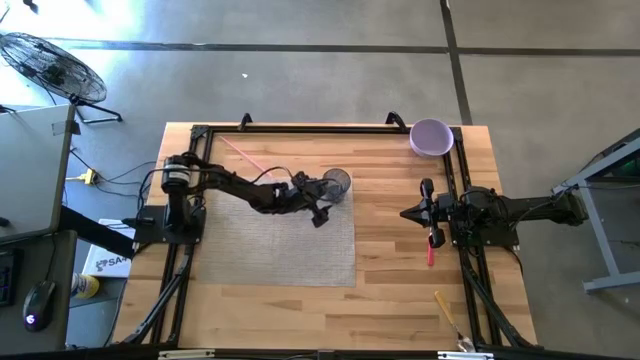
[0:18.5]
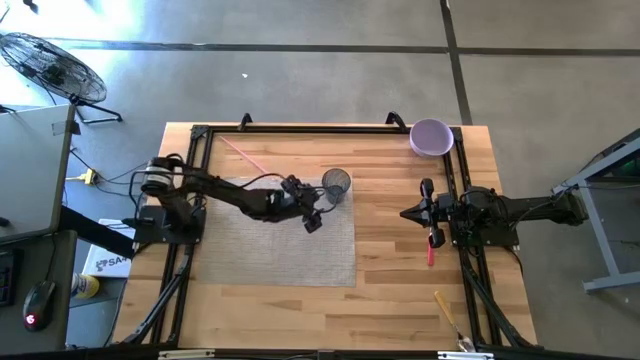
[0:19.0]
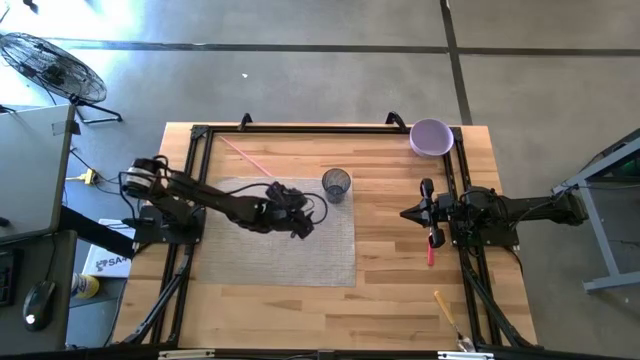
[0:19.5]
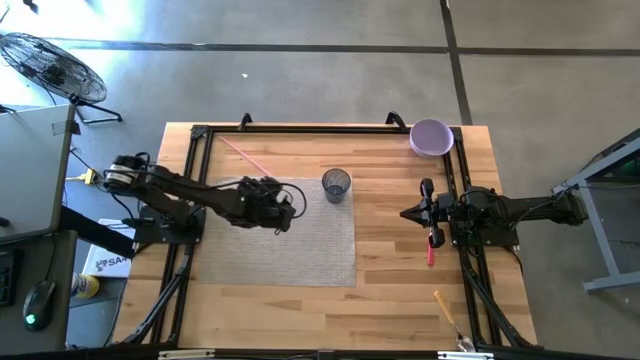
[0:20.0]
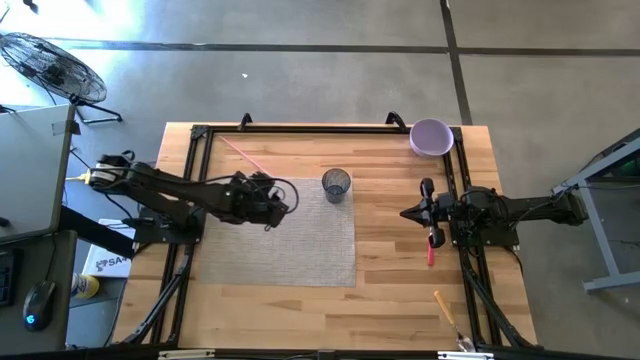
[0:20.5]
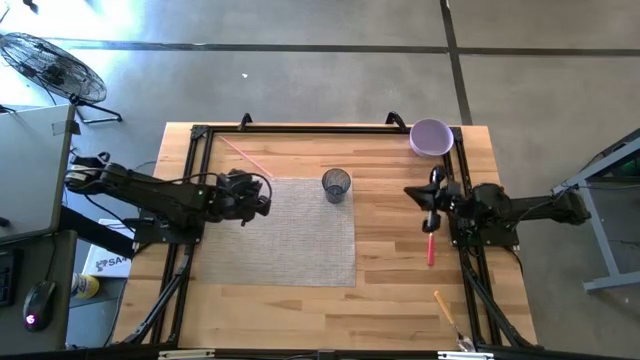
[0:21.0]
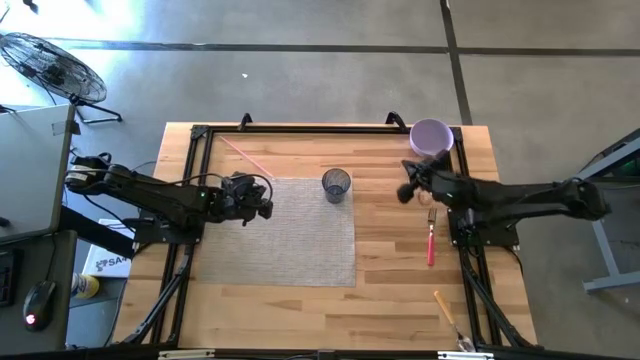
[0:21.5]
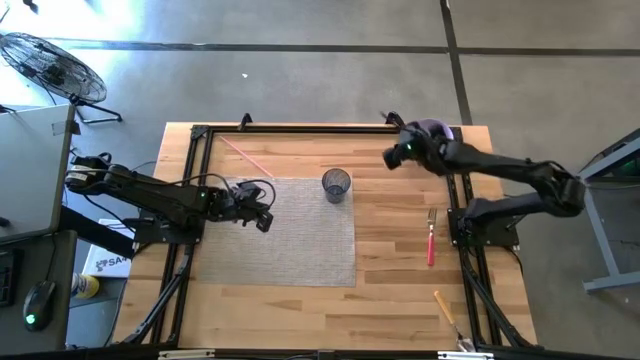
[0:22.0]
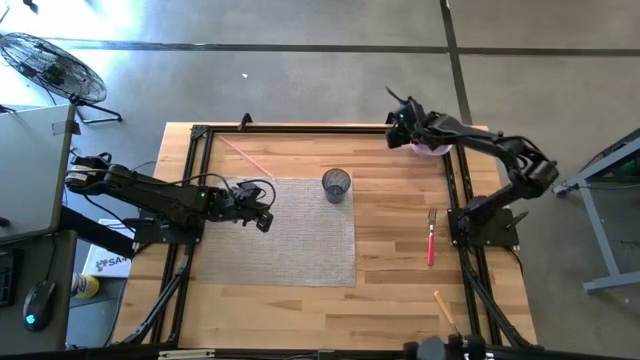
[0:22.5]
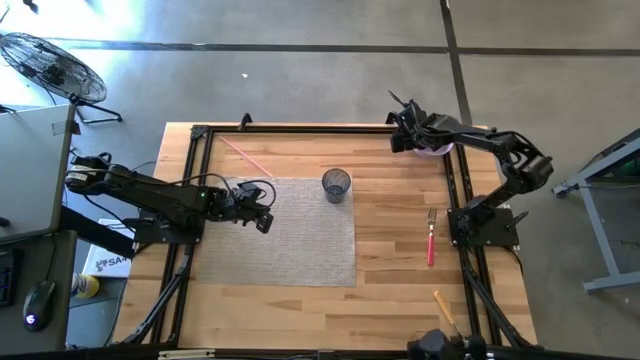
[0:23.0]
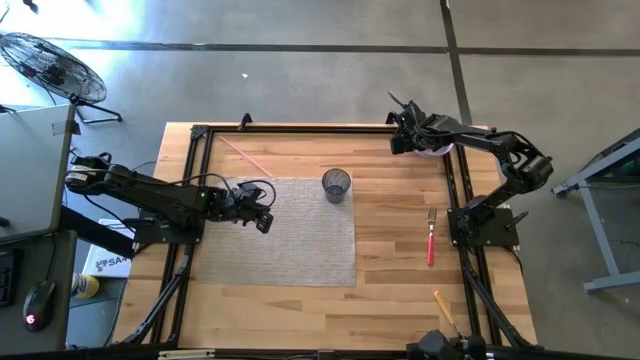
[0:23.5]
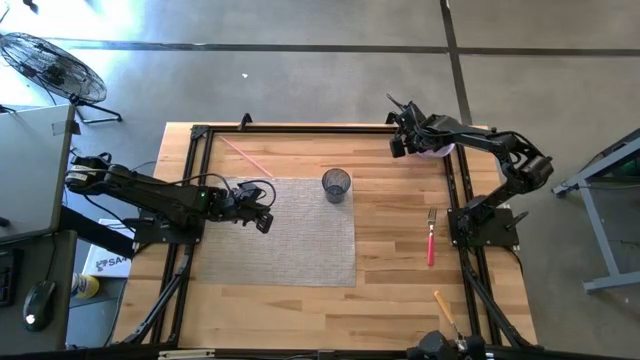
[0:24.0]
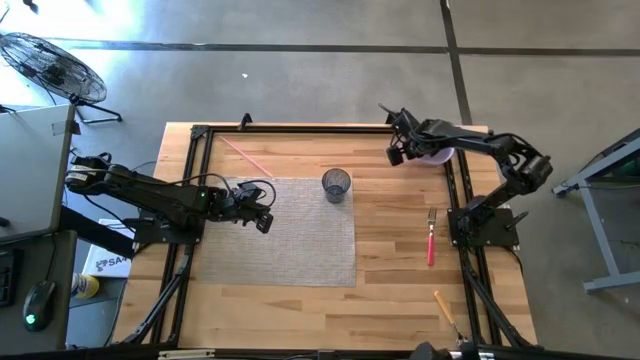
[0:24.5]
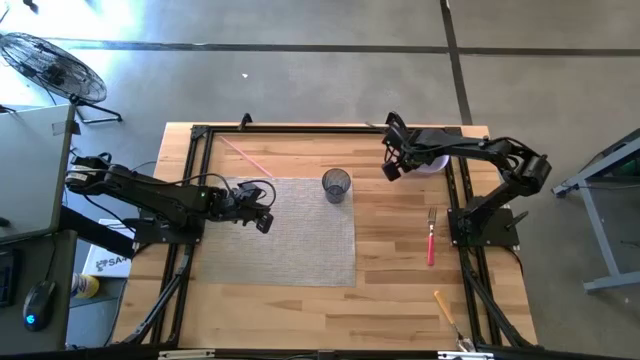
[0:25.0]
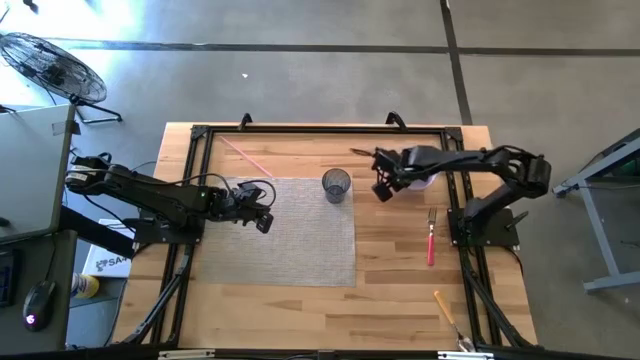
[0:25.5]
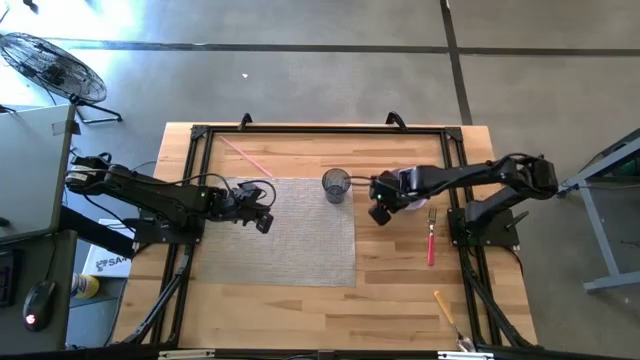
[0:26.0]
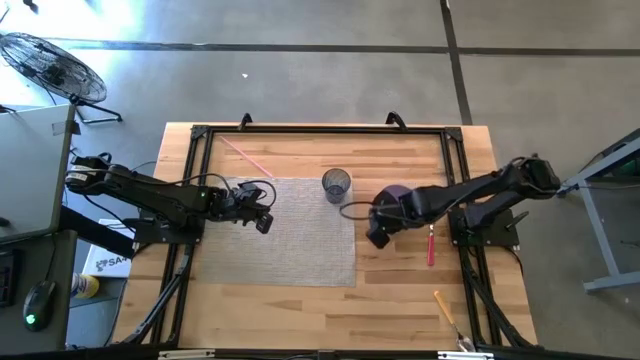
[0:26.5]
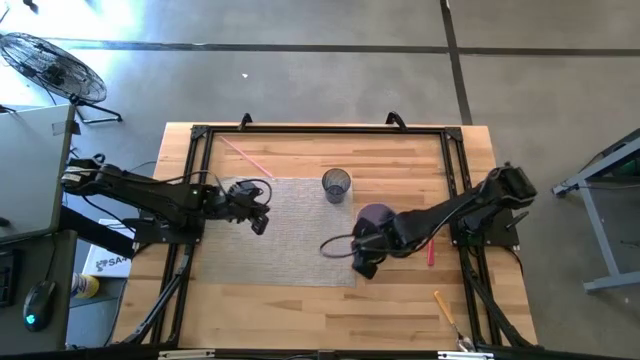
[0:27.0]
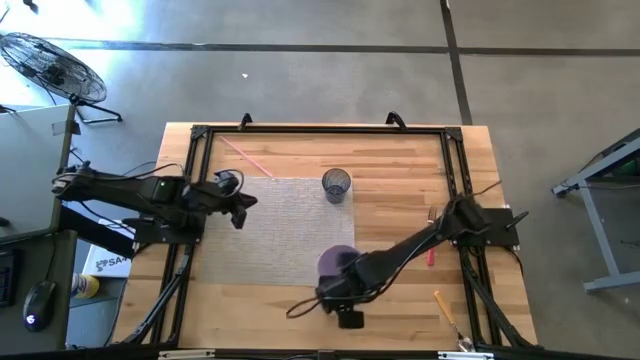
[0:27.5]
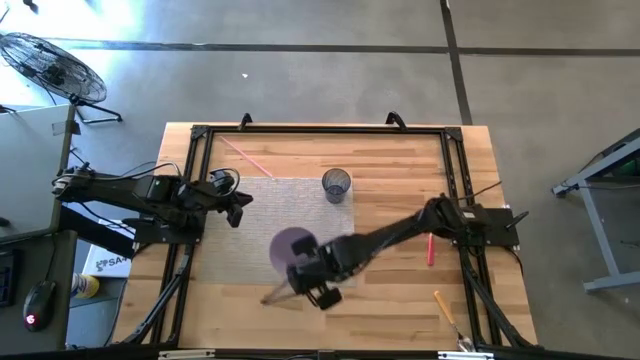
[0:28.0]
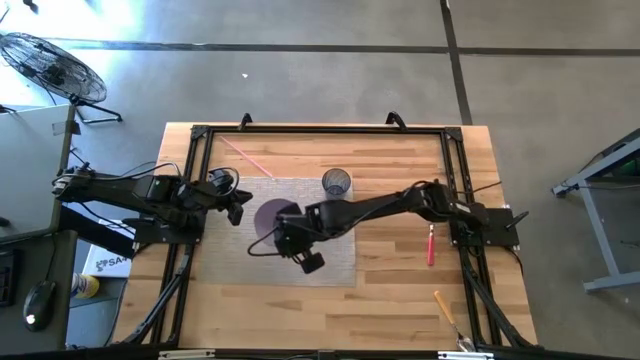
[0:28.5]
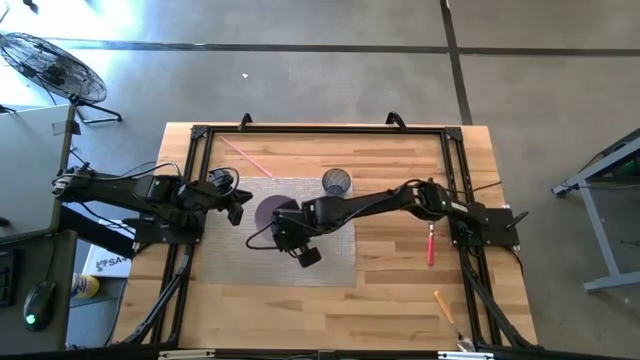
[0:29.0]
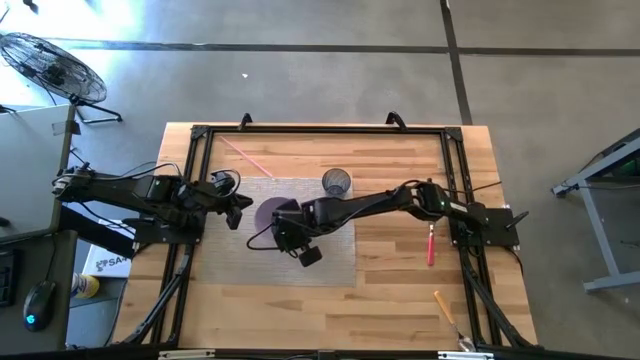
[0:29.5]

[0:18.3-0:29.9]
Task: Pick & Place Utensil
Put the purple bowl on the gray mat to the bottom left of the blue cup

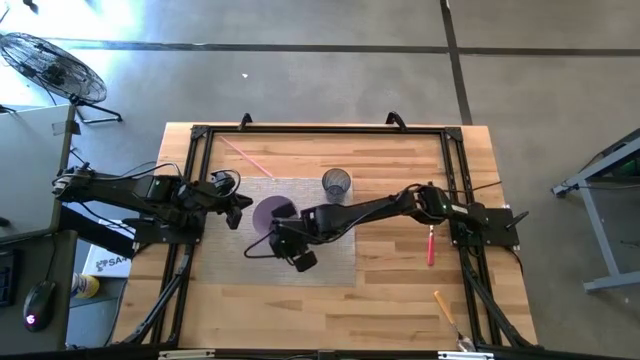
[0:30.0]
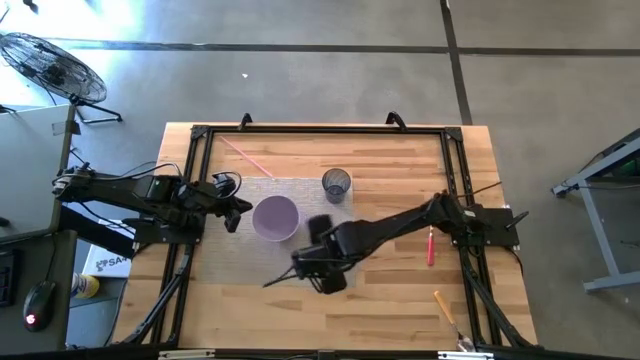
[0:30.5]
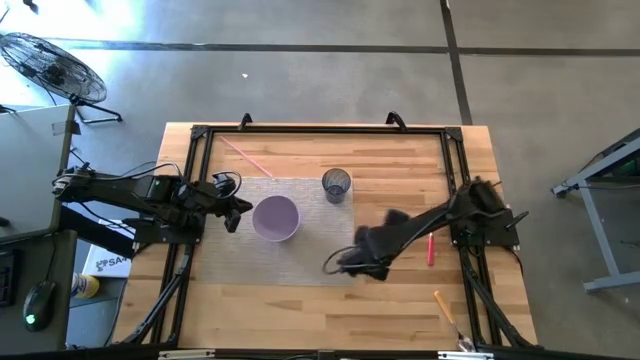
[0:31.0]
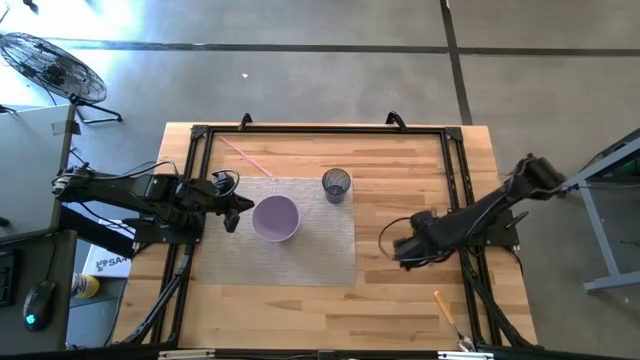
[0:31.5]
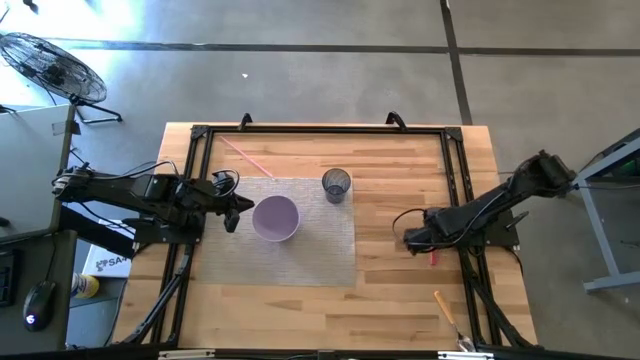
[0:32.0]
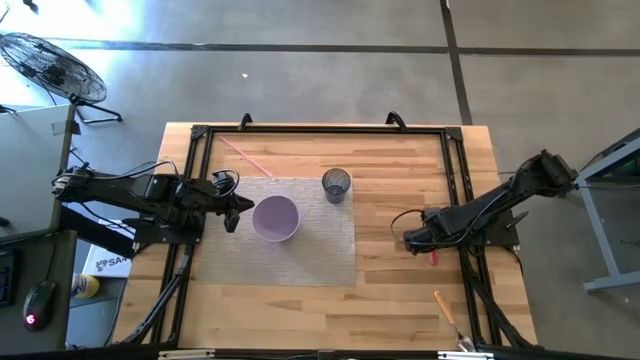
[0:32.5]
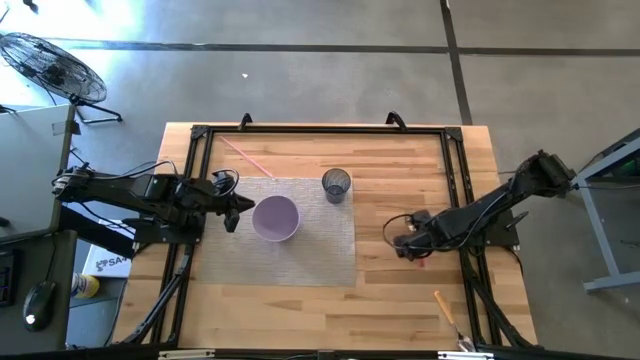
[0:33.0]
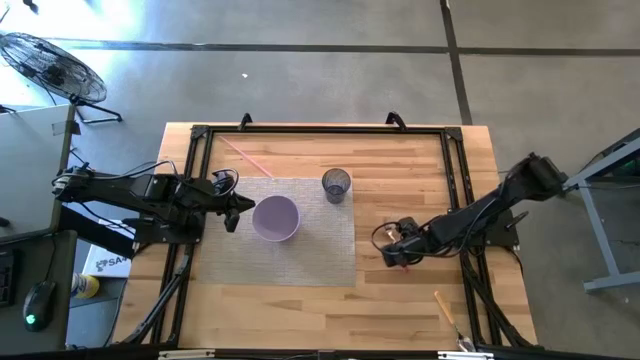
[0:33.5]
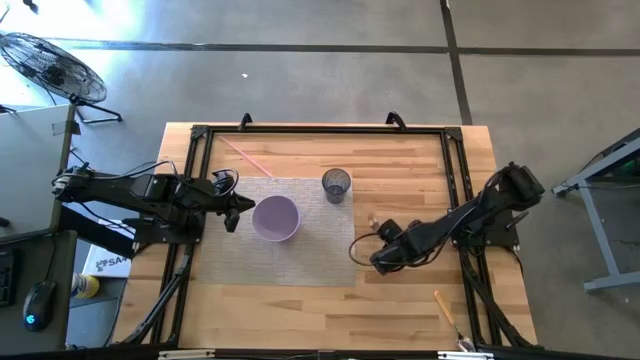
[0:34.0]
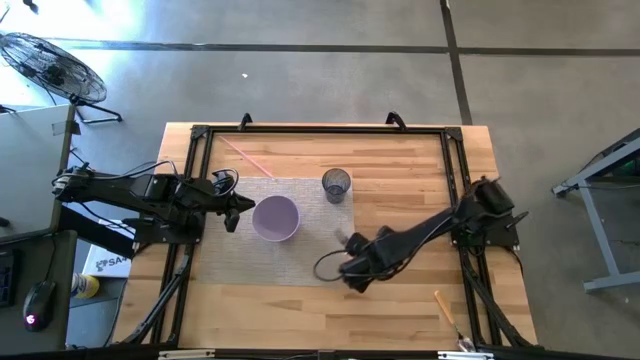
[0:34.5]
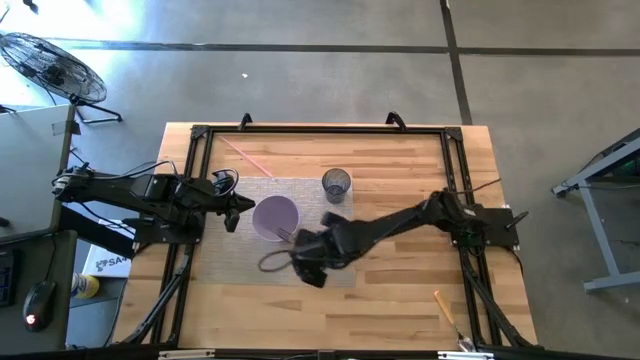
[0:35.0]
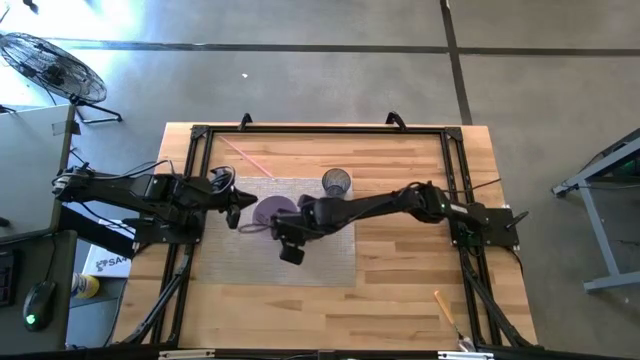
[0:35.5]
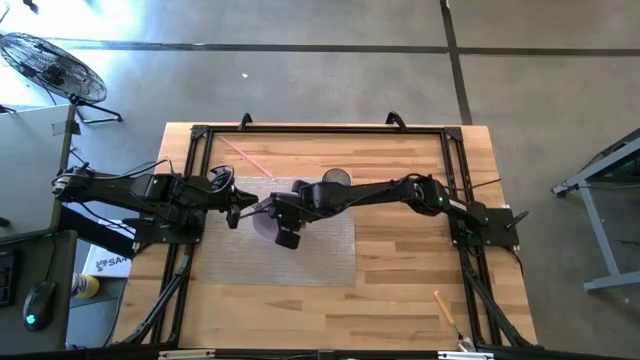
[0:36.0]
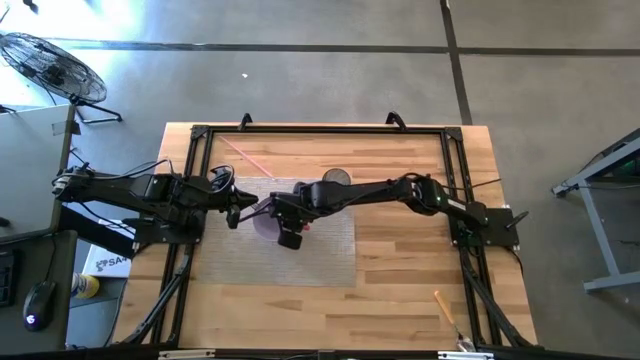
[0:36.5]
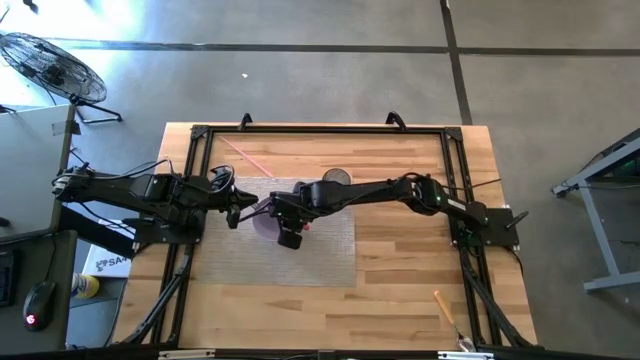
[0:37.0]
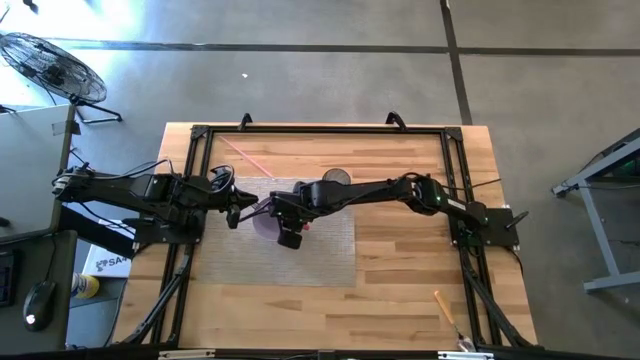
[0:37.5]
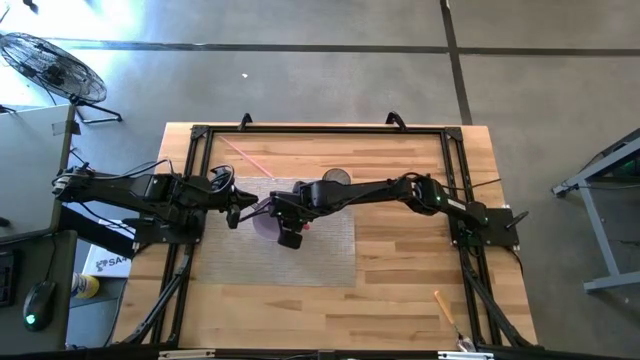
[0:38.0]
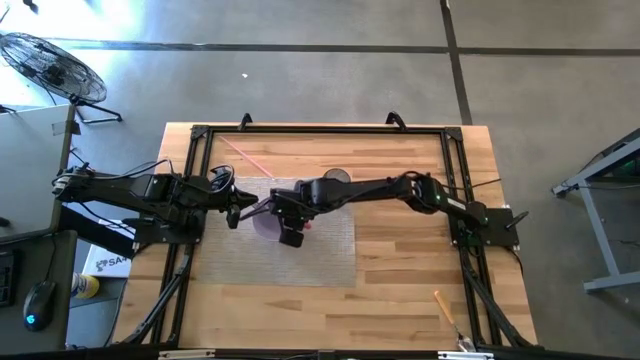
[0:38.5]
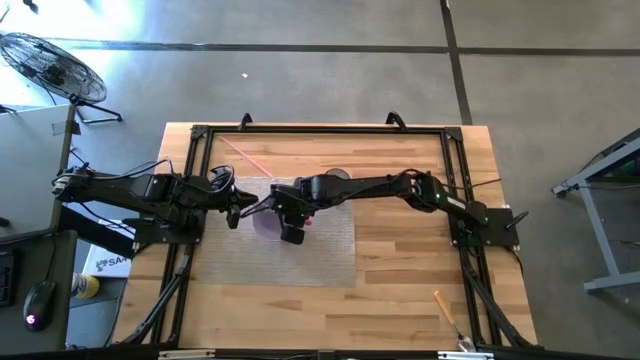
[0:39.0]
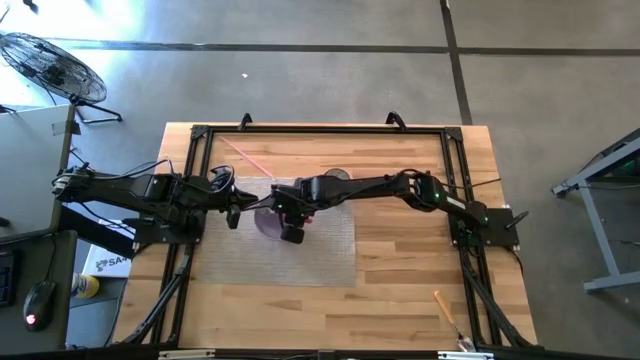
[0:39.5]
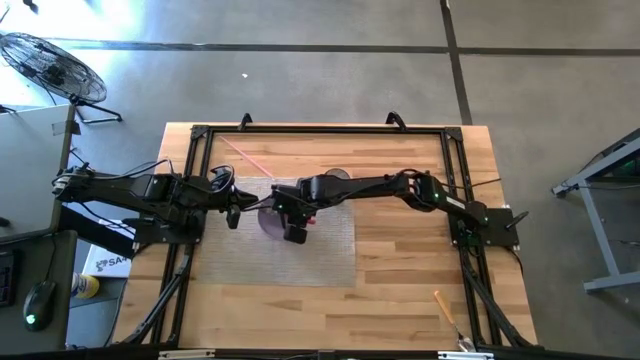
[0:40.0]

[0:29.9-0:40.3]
Put the pink fork into the purple bowl

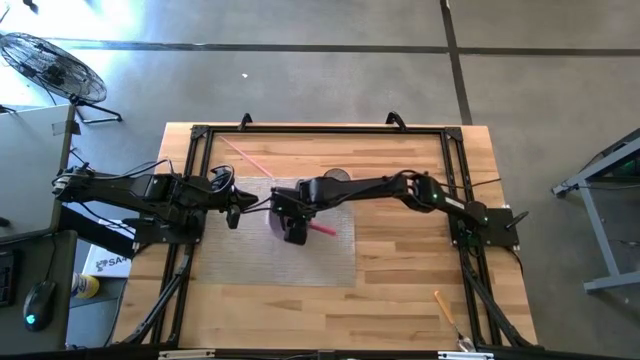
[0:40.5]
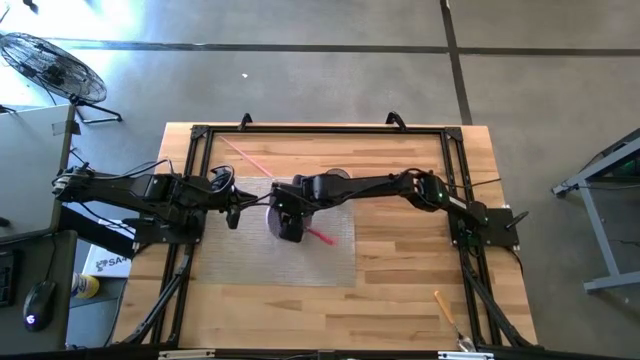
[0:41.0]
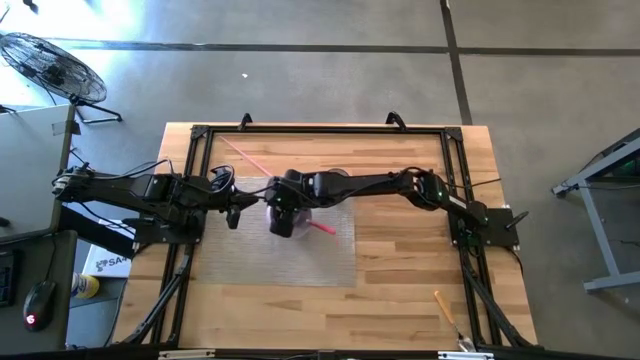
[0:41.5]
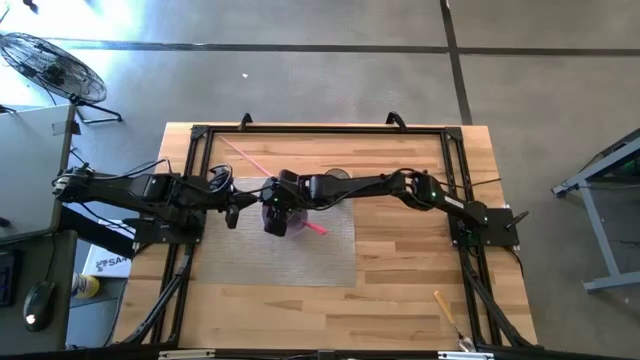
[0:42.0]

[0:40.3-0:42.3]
Put the pink fork into the purple bowl
